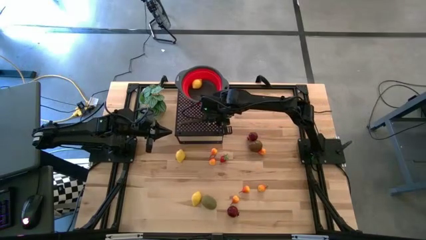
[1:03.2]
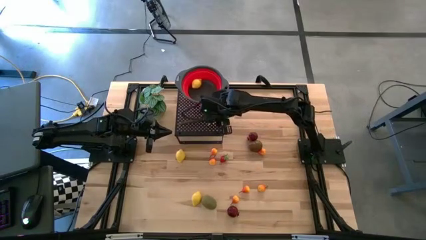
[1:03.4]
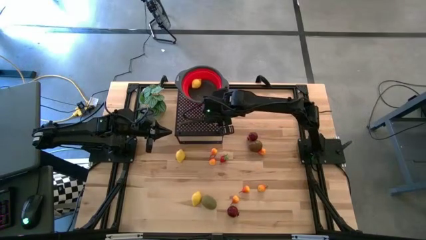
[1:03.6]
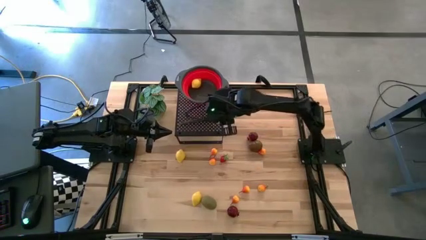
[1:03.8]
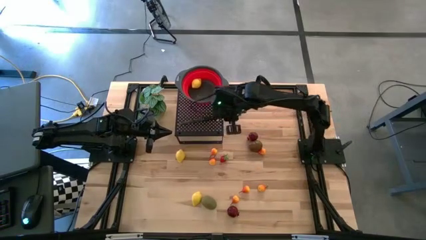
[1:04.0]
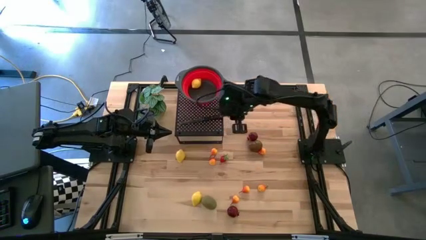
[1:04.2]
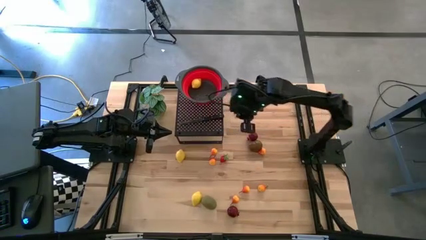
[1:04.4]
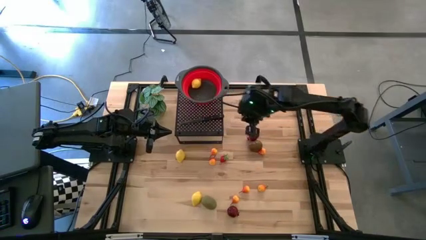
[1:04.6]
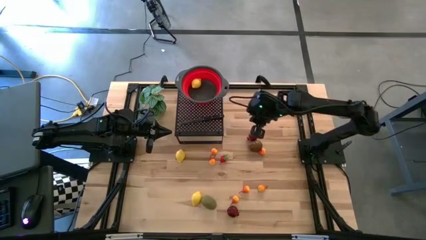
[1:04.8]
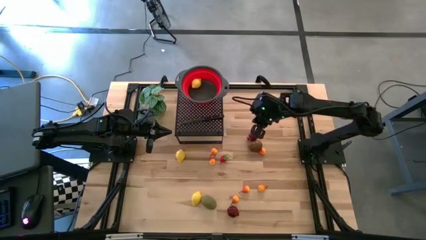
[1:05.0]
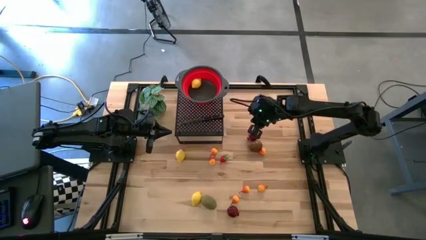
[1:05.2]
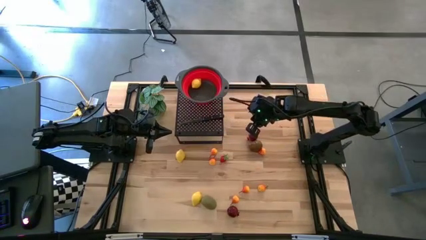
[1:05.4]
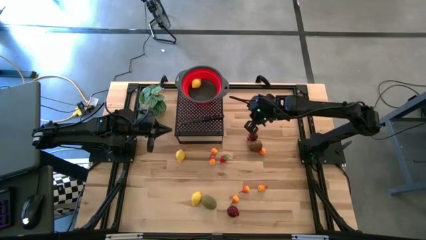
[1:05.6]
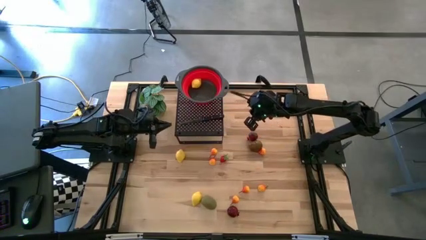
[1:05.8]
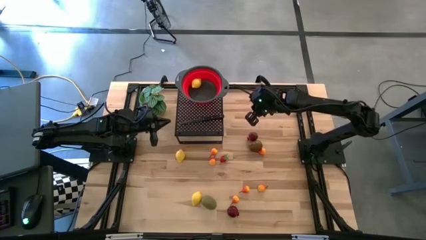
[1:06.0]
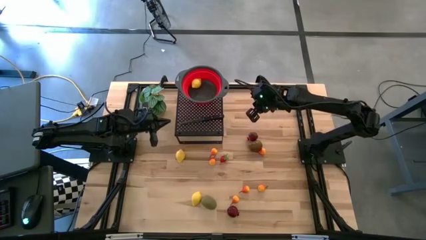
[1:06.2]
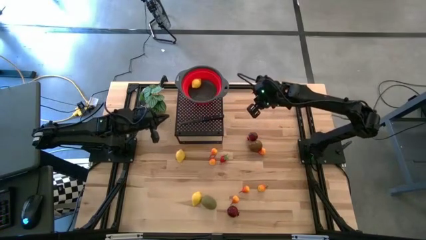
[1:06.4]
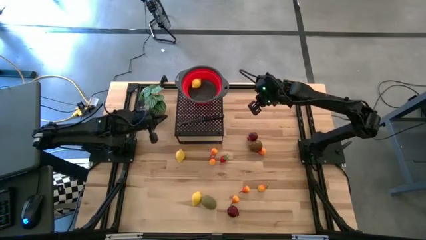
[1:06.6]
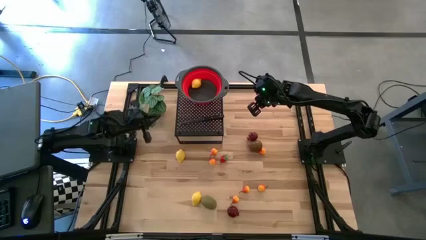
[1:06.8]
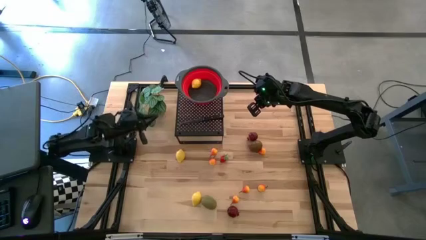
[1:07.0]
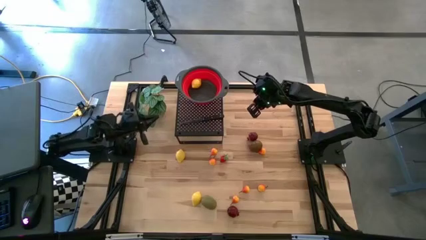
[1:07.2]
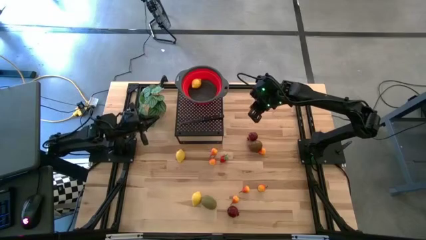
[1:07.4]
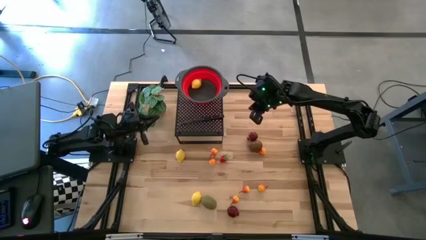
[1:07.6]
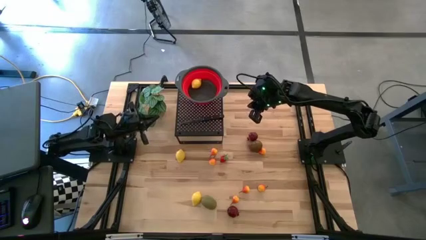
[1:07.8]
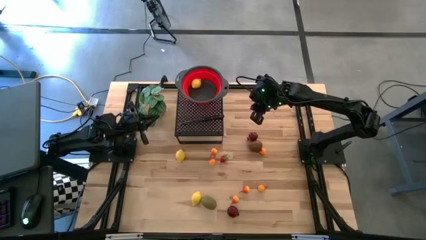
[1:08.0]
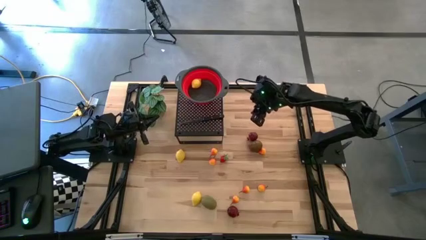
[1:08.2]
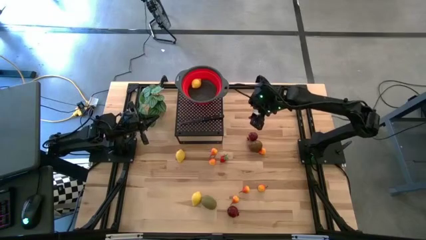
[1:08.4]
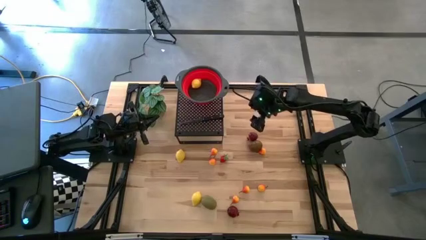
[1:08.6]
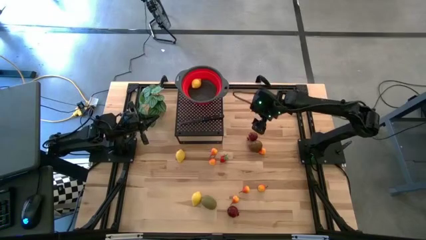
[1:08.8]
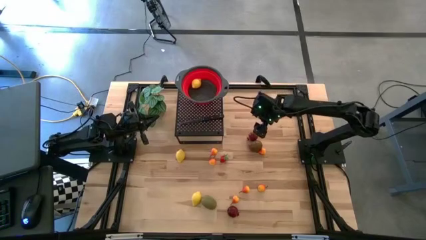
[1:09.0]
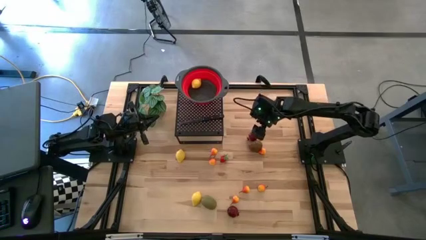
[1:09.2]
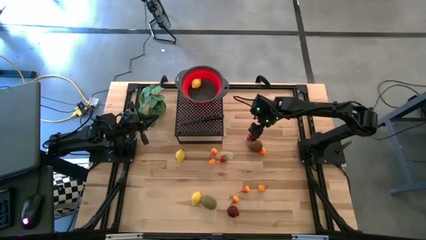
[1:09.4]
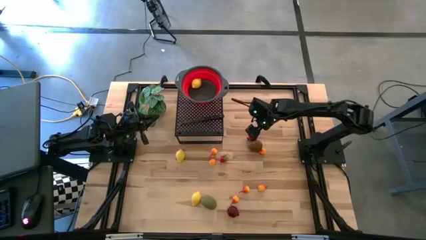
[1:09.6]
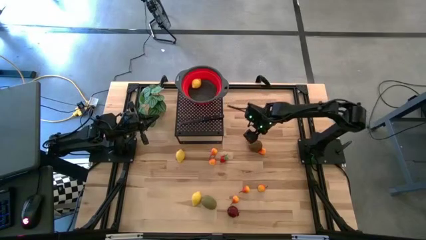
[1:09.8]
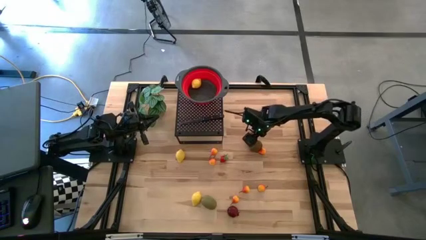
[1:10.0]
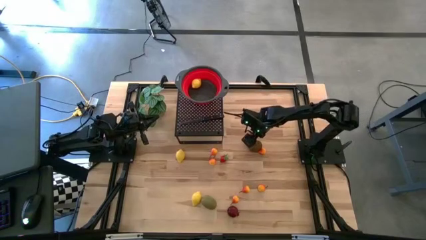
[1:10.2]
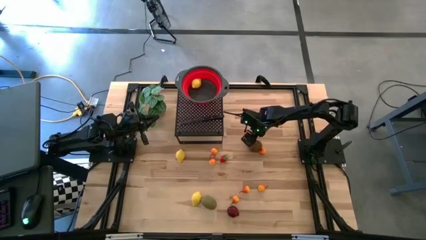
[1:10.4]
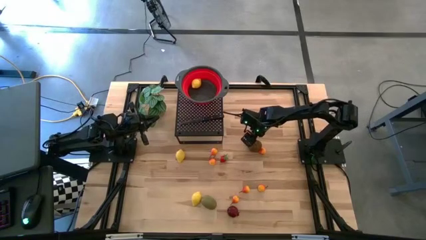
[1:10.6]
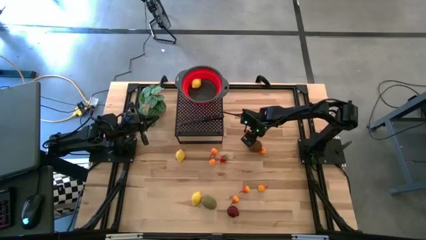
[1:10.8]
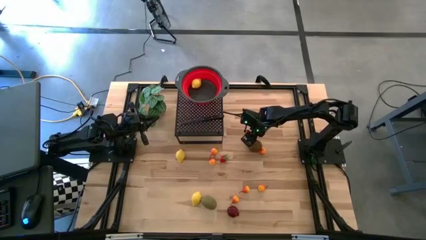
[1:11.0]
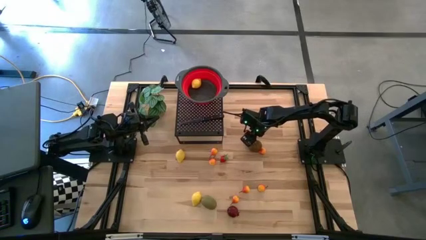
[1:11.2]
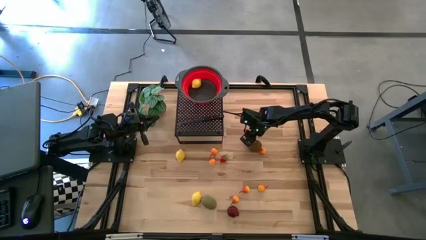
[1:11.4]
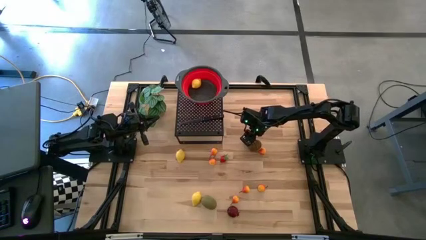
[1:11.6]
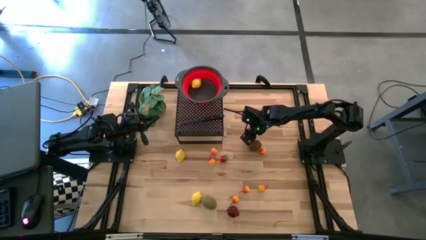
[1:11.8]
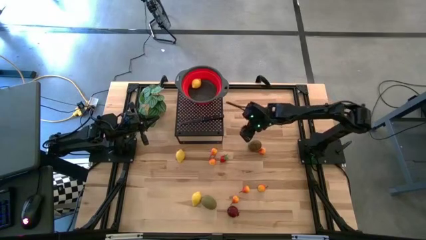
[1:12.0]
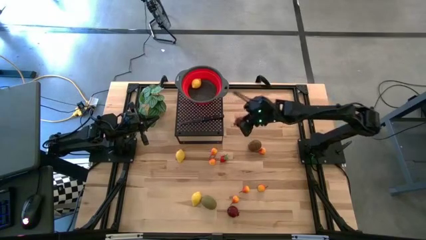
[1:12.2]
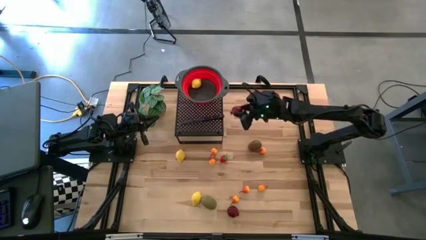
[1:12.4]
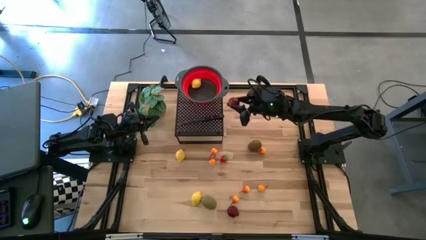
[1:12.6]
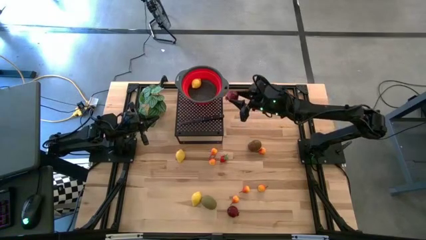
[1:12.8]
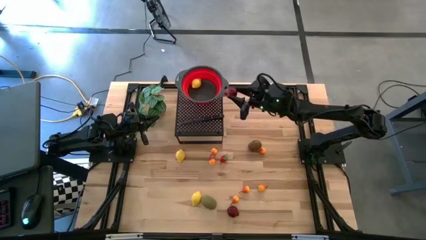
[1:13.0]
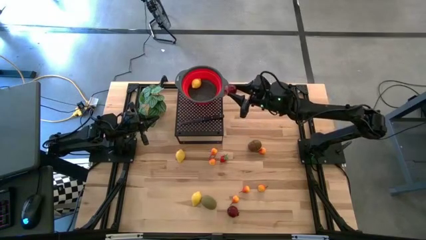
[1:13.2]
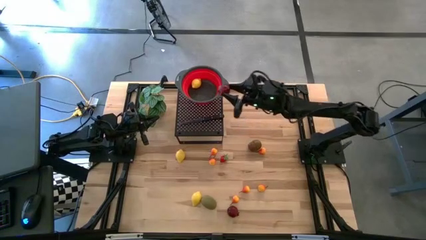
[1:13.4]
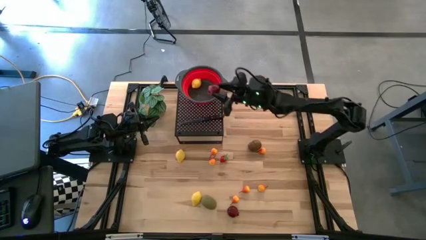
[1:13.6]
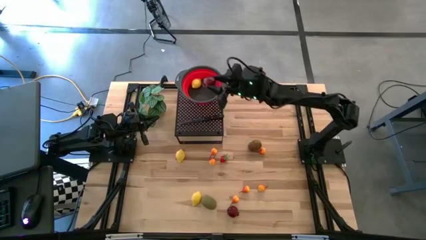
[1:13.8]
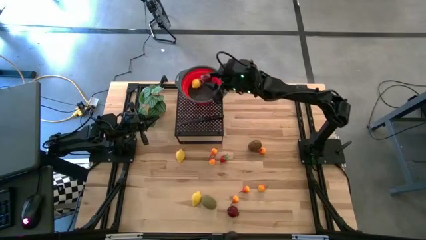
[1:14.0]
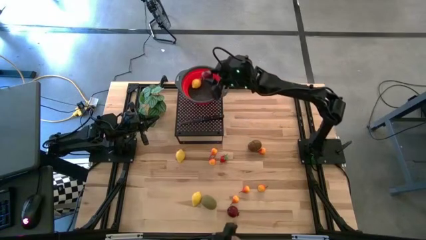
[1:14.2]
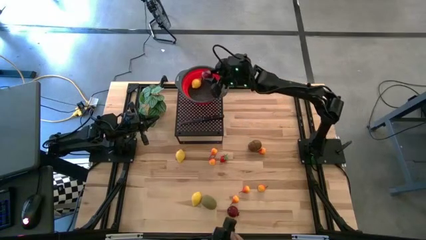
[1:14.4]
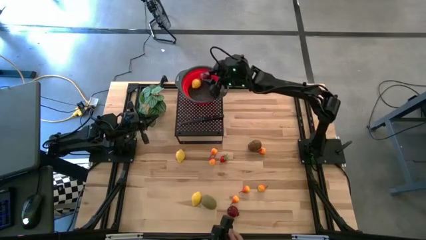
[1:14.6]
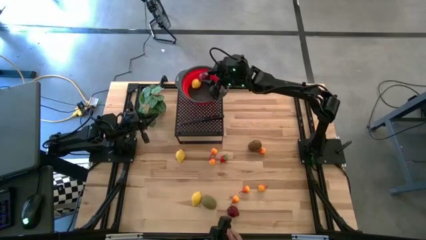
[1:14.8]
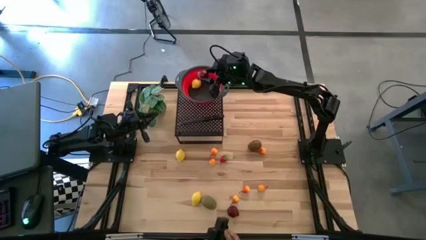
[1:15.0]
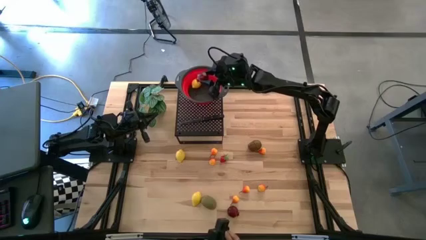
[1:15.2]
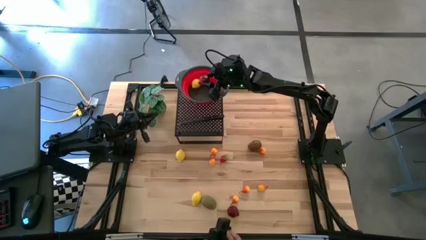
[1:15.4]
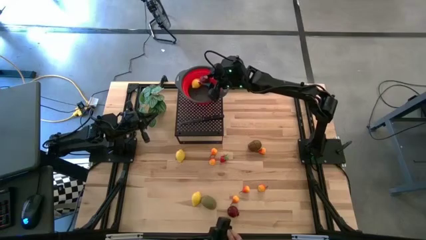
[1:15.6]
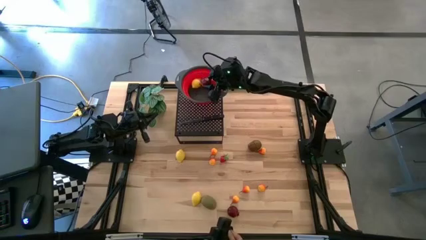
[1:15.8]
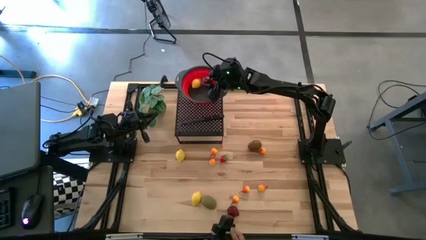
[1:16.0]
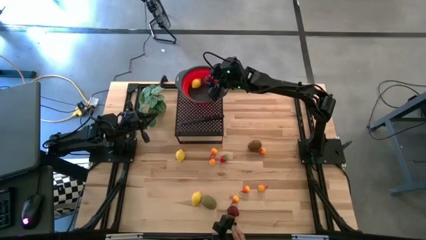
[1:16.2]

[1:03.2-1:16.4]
Task: Pick & Place Fruit
Put the top pomegranate into the red strainer bowl

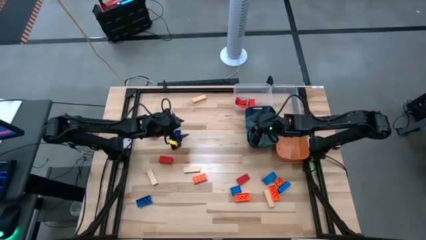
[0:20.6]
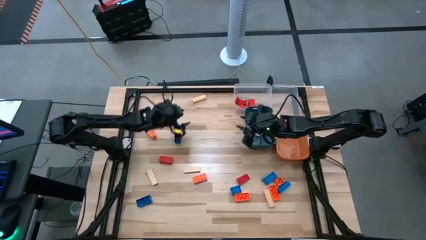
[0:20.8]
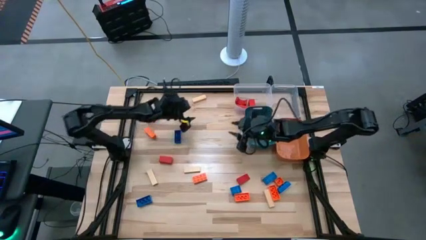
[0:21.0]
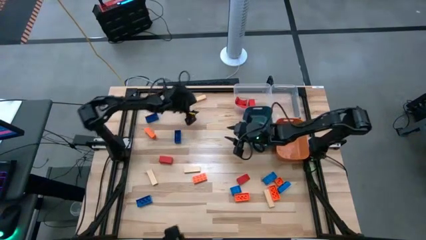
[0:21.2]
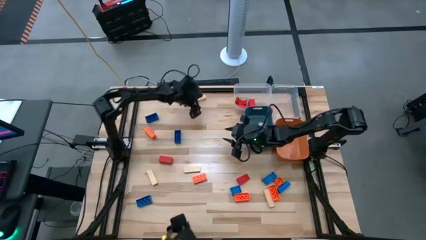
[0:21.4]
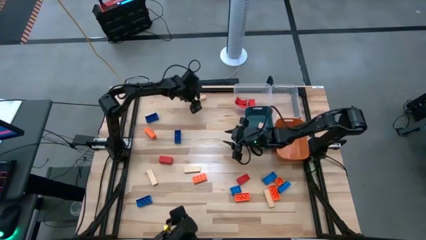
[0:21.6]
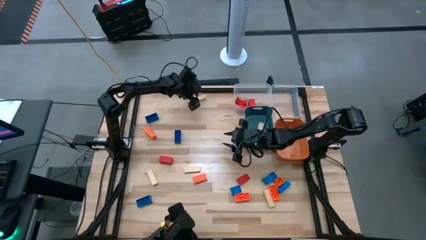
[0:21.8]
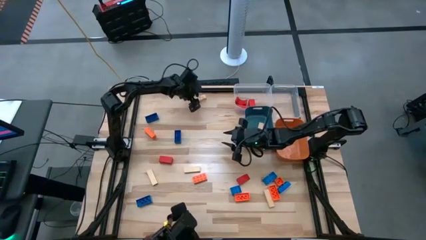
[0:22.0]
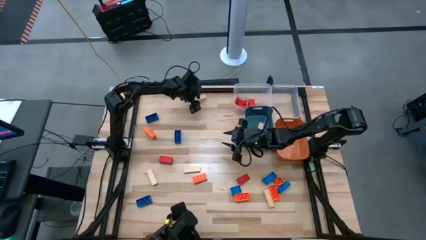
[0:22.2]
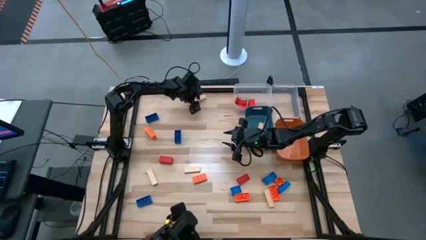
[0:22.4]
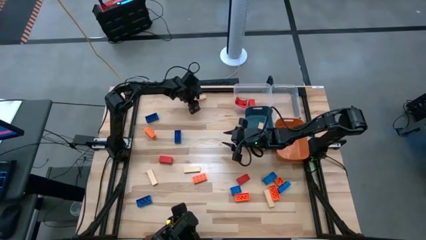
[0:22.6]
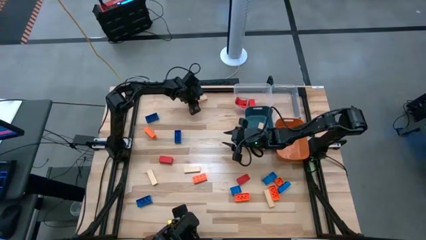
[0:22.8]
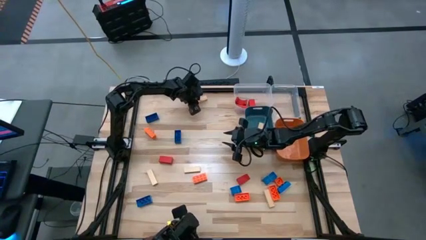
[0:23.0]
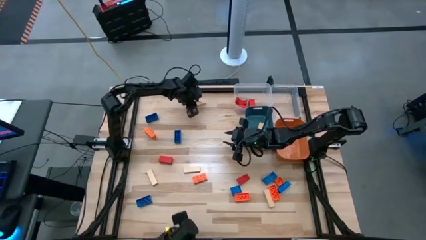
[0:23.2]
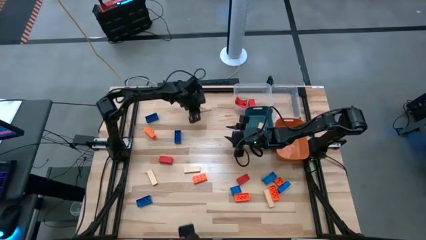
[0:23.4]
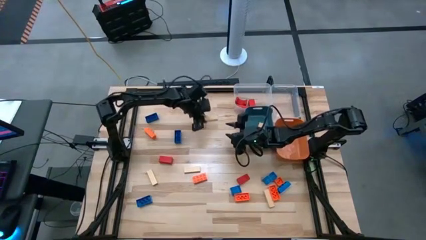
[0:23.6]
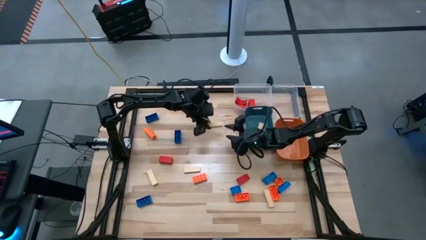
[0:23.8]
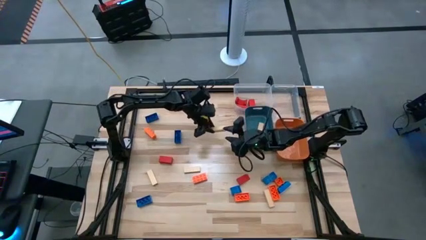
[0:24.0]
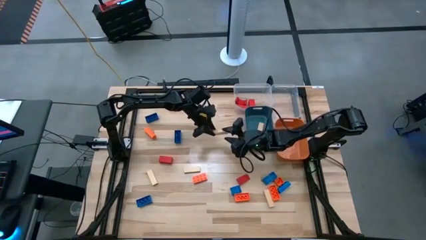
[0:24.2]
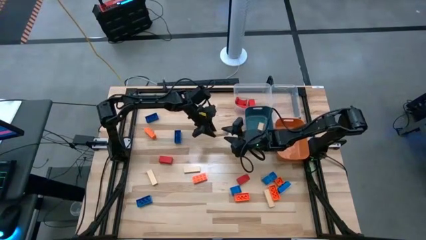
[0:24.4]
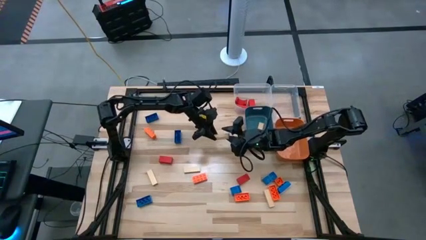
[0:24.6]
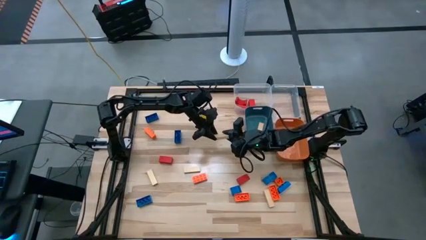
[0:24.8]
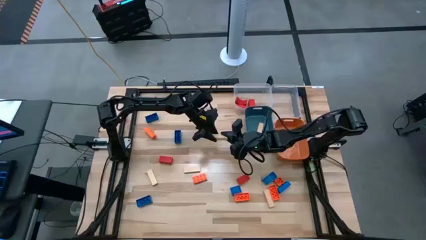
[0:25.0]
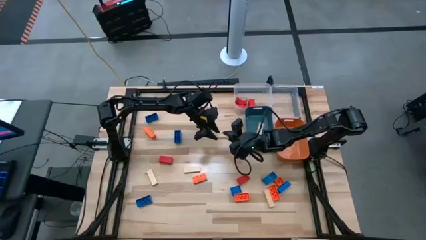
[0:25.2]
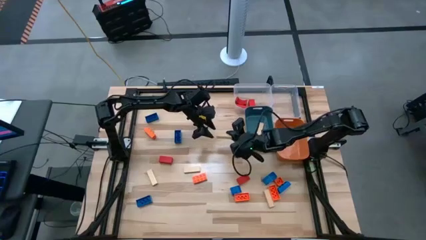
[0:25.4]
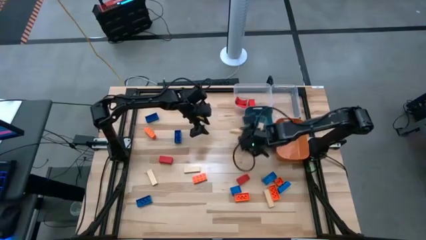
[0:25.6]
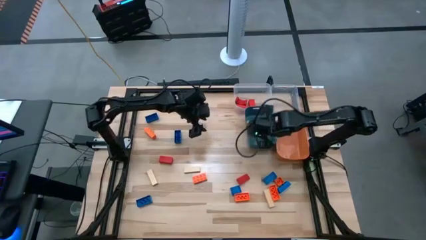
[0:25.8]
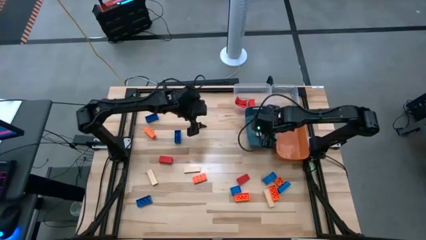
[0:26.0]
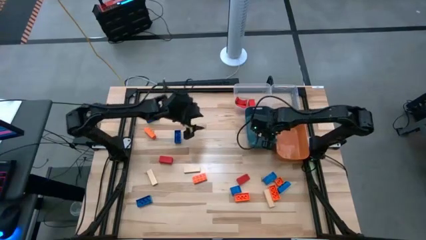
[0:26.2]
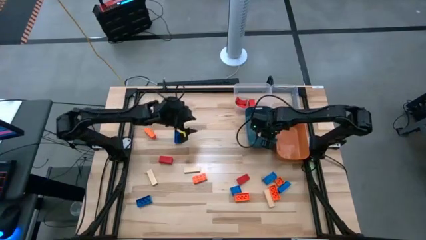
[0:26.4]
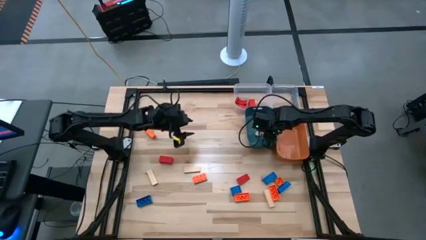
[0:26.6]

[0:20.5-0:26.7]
Task: Sort blocks
Put the brown block into the blue bin
